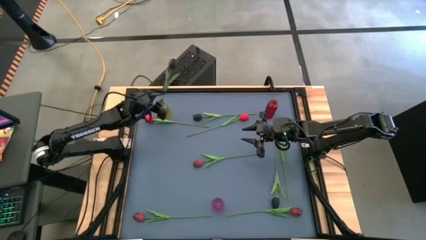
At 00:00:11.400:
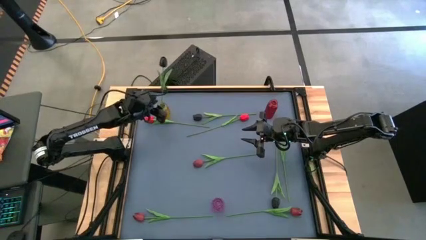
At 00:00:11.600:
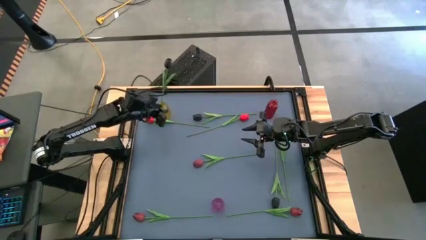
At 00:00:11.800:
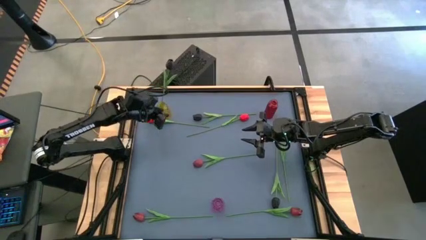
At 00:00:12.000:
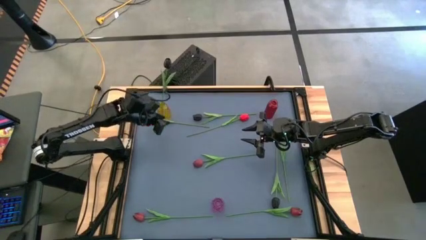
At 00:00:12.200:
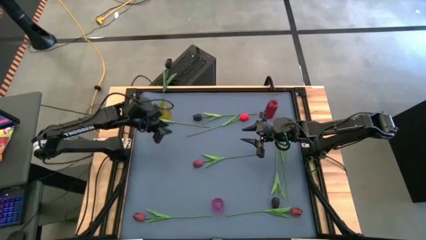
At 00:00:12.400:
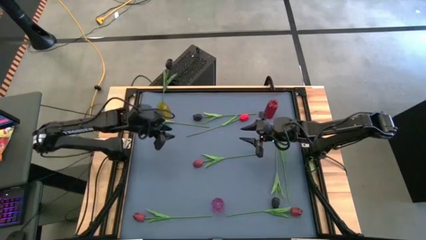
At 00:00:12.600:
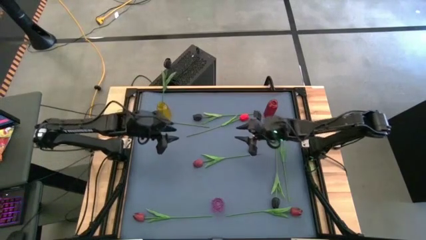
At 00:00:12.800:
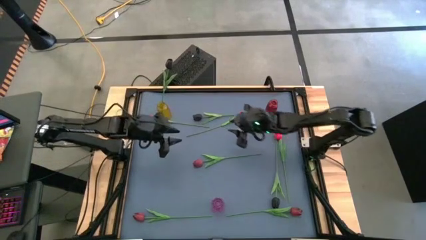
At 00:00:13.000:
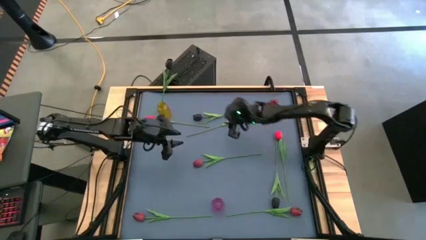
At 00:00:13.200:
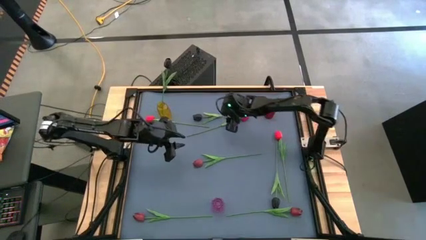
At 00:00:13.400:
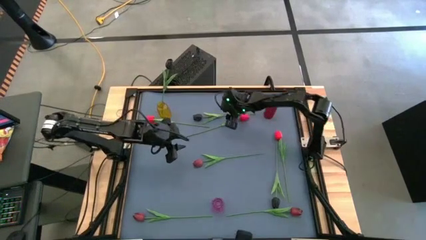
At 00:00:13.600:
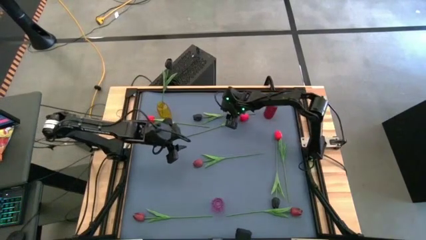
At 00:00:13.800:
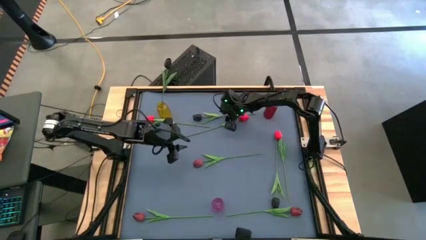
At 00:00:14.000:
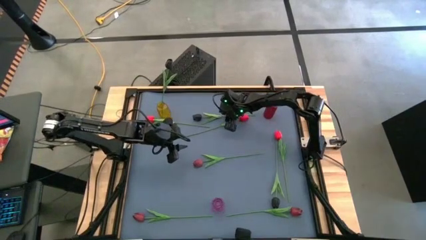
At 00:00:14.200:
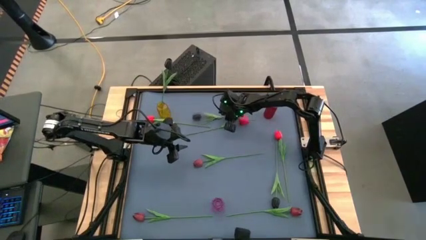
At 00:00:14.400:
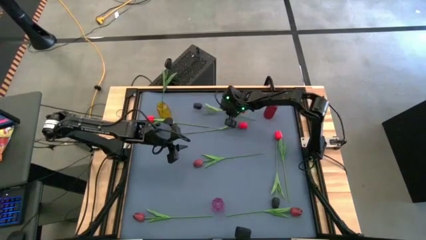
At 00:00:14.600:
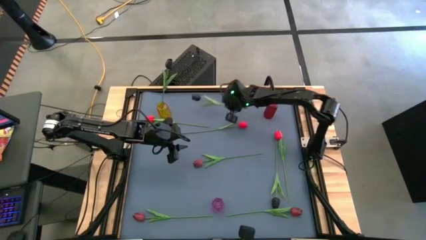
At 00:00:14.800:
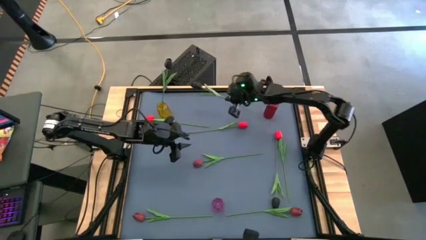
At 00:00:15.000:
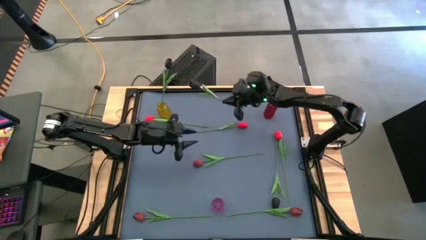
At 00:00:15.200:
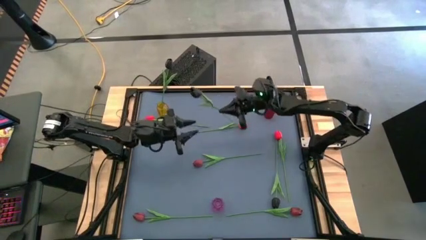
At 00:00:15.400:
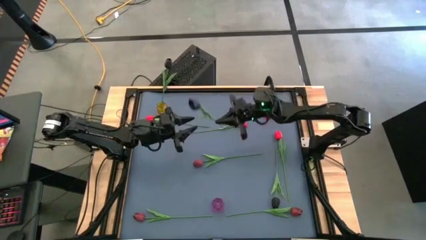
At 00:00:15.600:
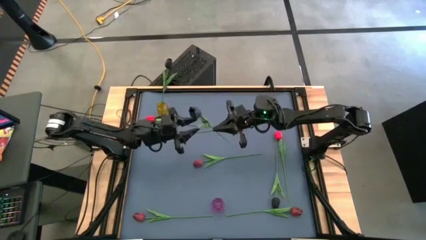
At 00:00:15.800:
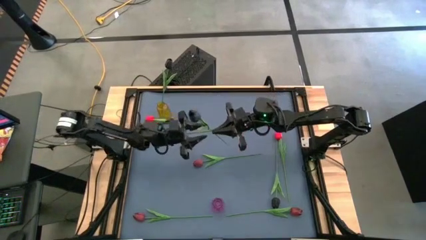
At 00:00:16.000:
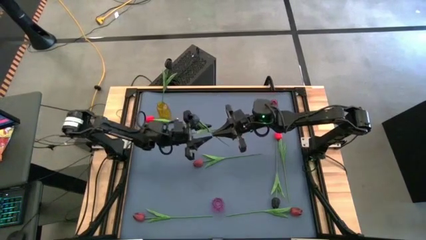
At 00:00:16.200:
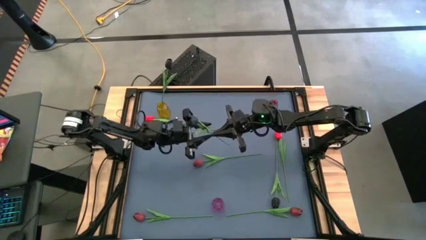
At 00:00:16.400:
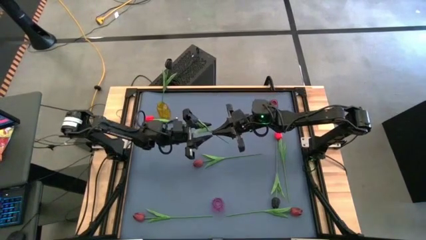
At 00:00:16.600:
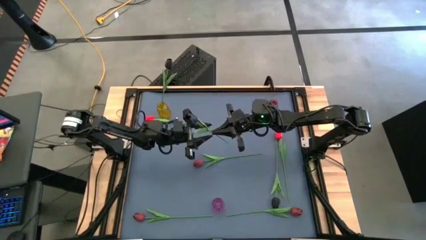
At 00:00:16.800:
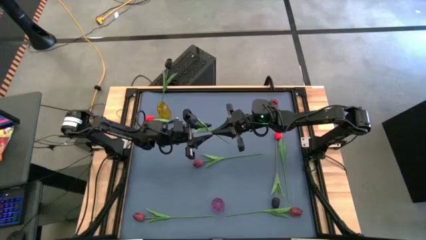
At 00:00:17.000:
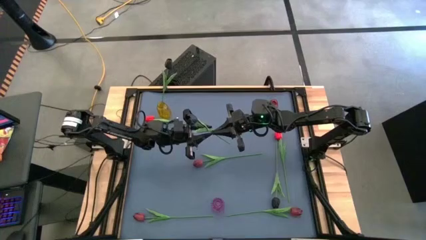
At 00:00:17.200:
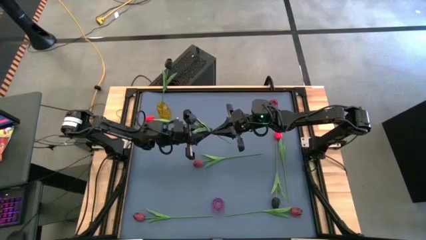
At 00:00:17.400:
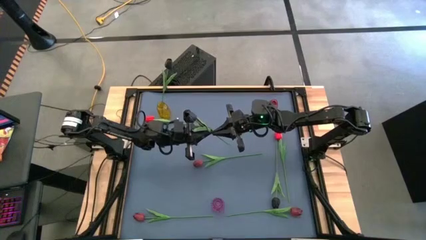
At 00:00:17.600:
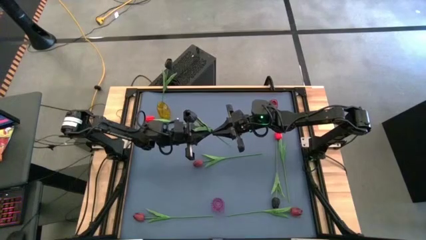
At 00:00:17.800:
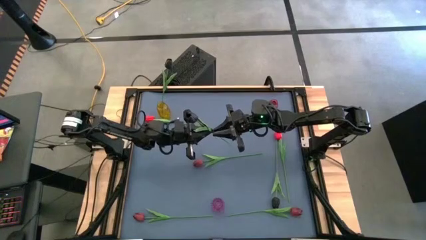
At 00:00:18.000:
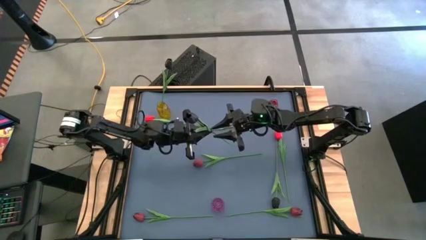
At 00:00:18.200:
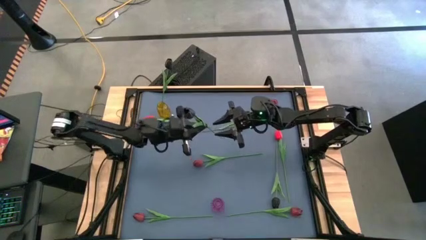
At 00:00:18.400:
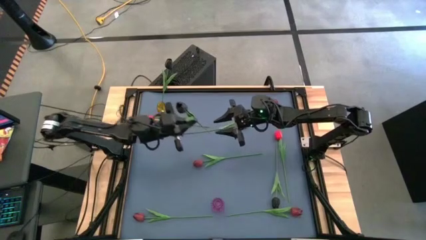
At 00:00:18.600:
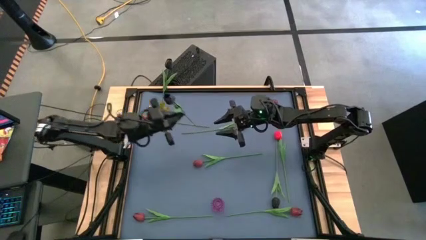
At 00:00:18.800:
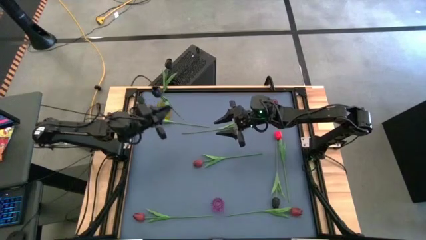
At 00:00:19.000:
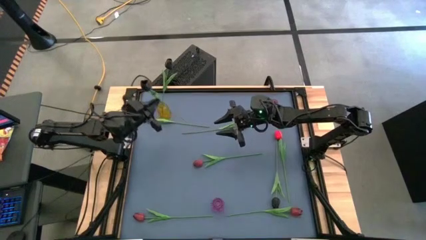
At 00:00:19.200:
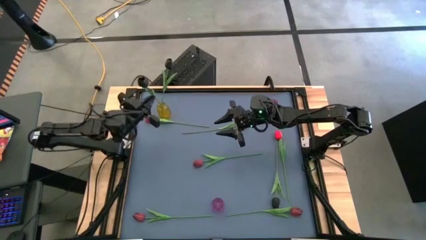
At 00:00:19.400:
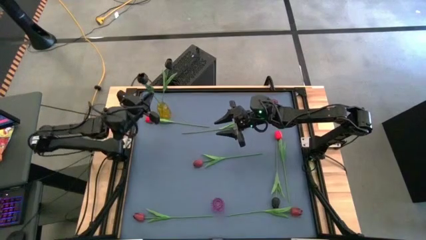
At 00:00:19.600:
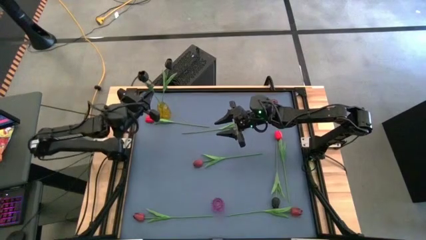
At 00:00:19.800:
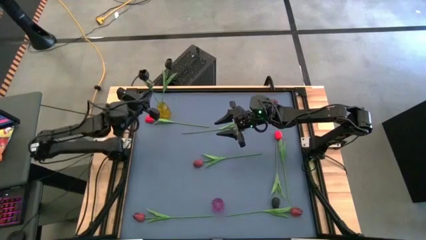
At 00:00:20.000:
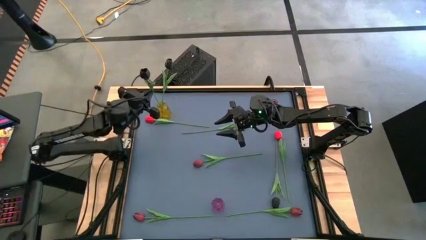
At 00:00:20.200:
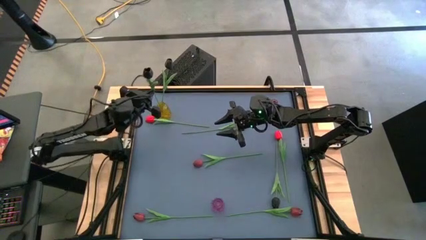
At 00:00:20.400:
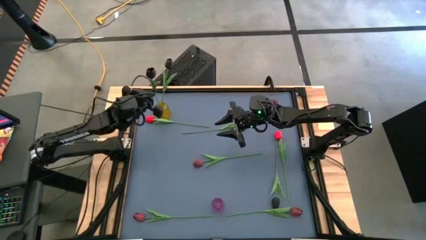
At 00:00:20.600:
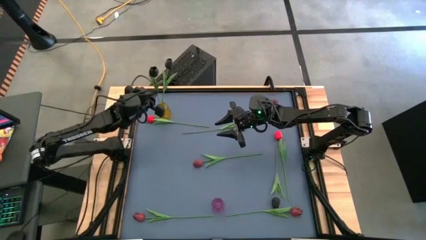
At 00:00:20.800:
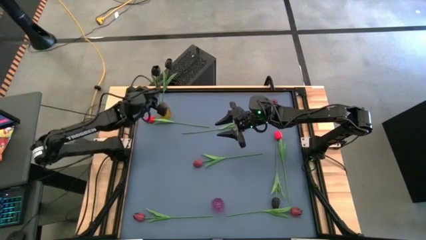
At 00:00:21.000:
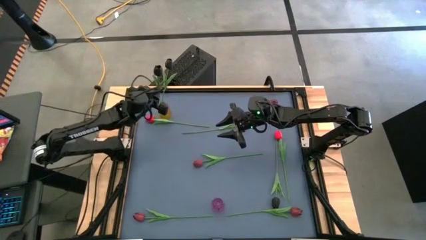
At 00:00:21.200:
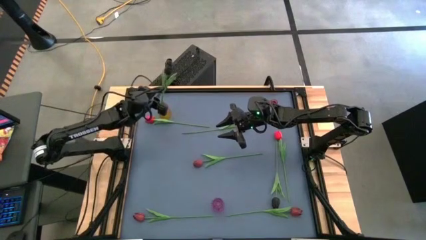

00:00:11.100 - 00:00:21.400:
Task: Sort flowers into vase by color
Put the top black flower into the yellow vase
